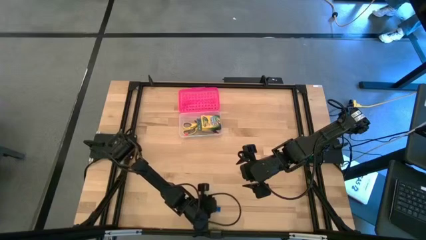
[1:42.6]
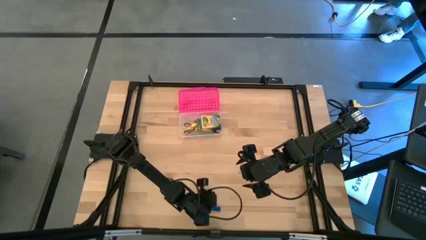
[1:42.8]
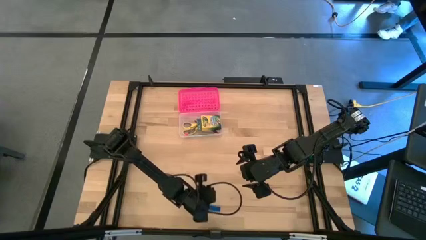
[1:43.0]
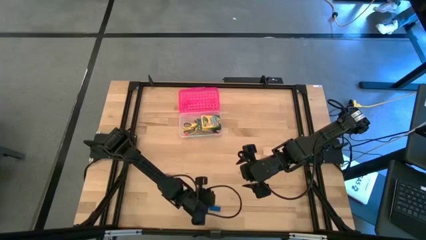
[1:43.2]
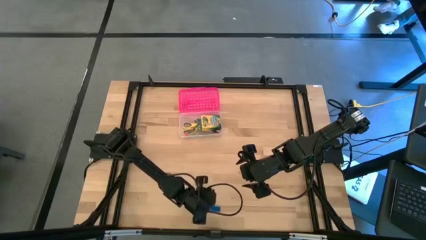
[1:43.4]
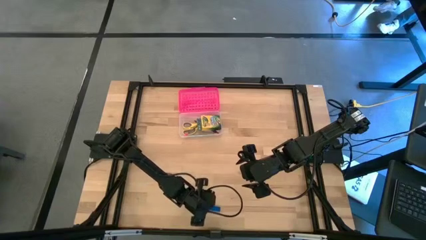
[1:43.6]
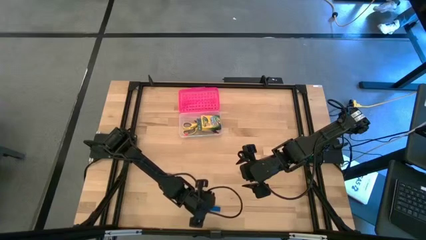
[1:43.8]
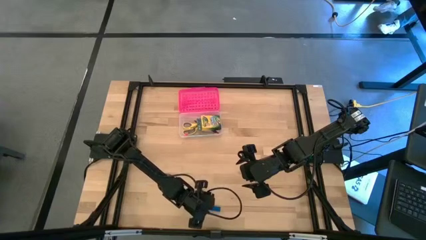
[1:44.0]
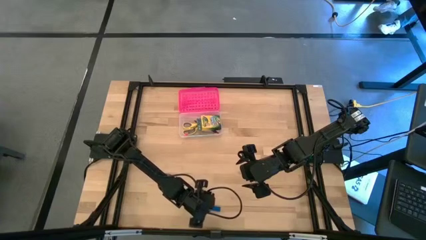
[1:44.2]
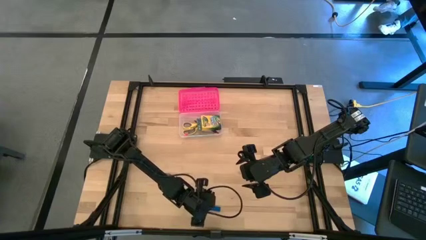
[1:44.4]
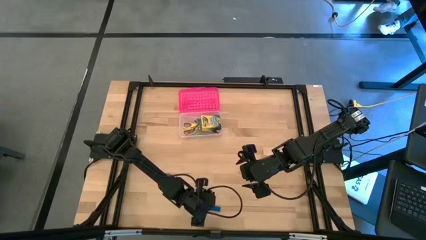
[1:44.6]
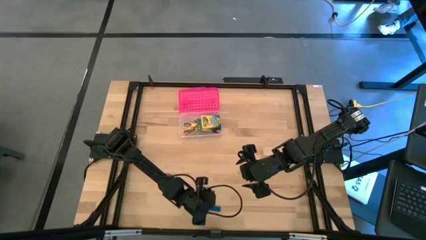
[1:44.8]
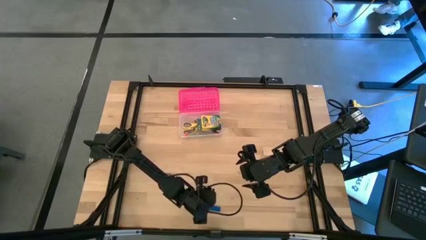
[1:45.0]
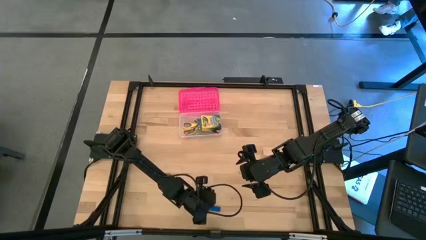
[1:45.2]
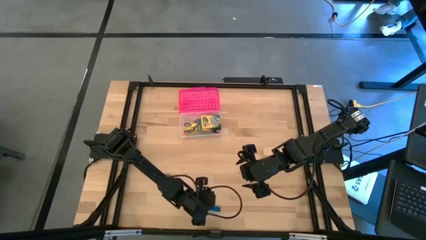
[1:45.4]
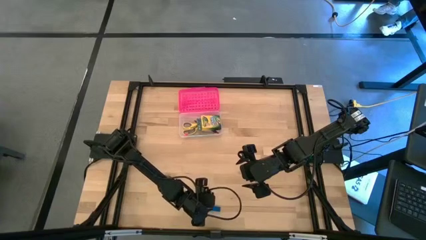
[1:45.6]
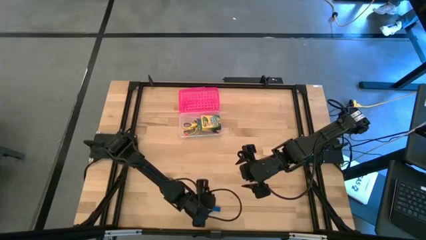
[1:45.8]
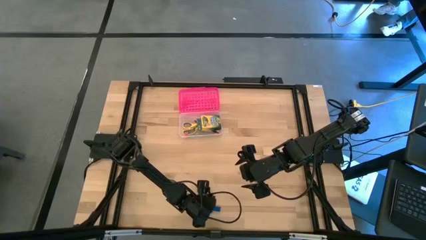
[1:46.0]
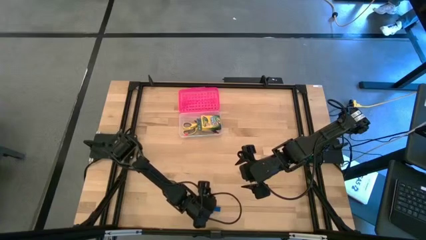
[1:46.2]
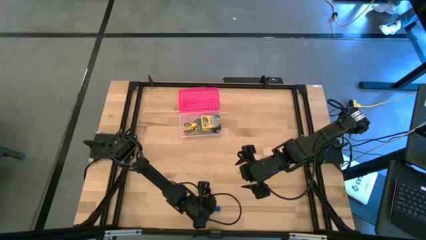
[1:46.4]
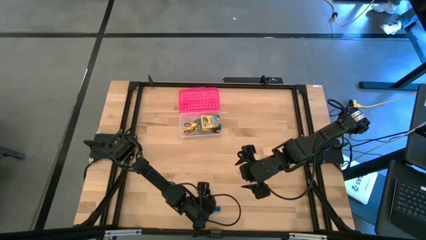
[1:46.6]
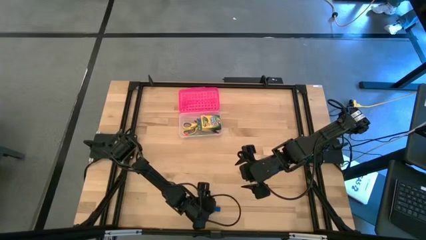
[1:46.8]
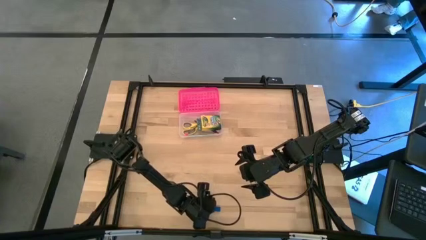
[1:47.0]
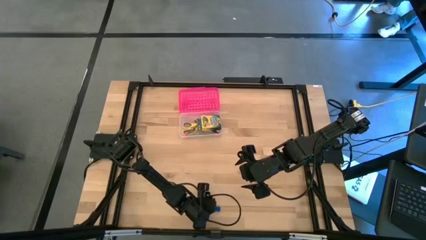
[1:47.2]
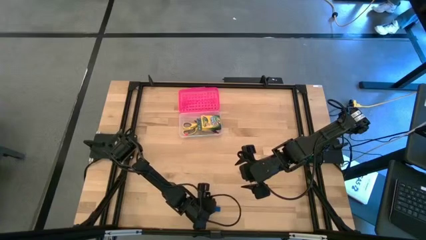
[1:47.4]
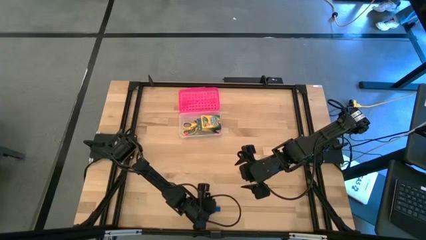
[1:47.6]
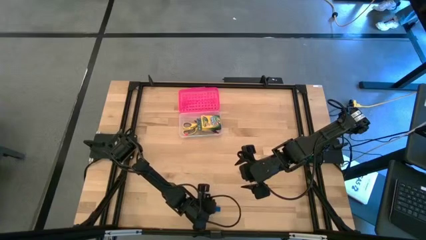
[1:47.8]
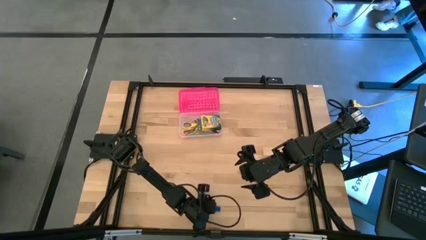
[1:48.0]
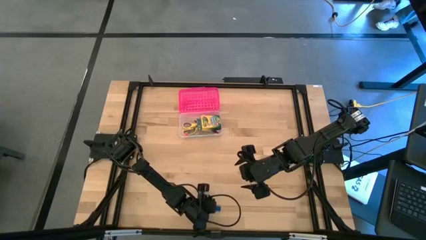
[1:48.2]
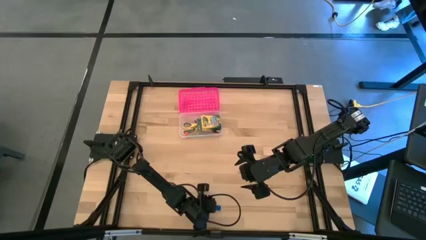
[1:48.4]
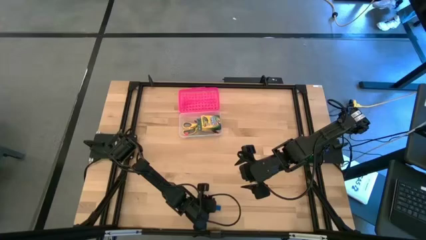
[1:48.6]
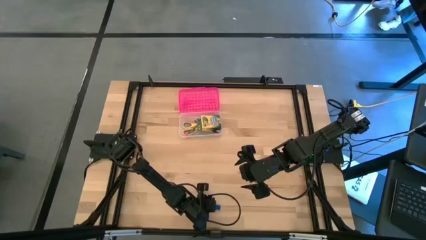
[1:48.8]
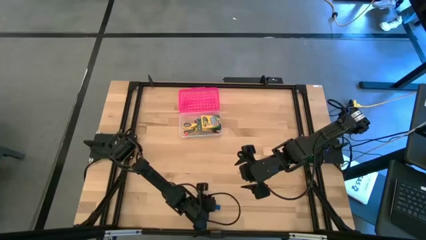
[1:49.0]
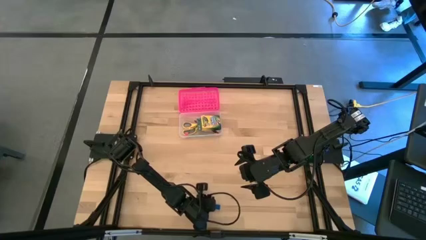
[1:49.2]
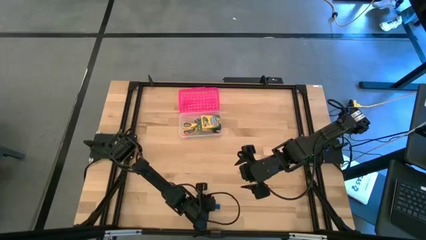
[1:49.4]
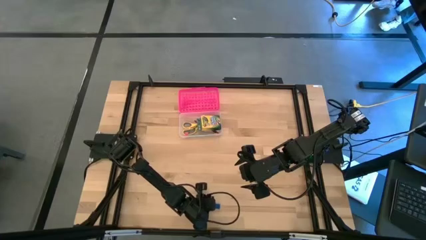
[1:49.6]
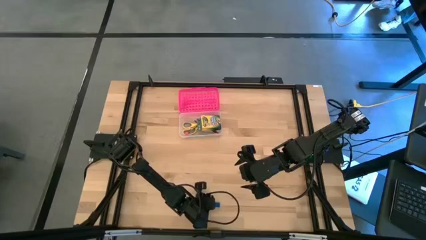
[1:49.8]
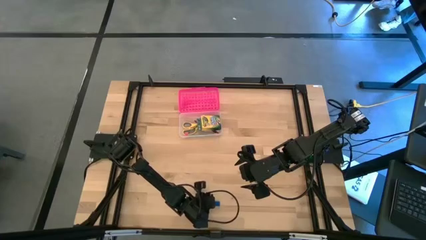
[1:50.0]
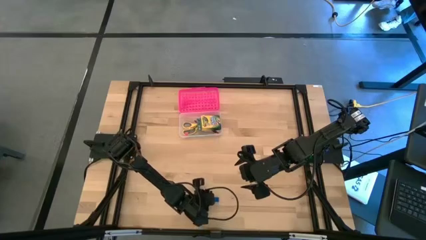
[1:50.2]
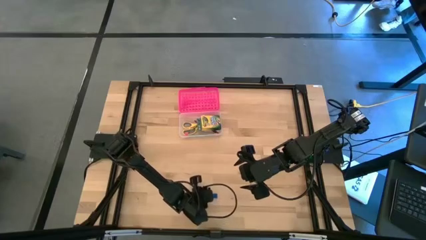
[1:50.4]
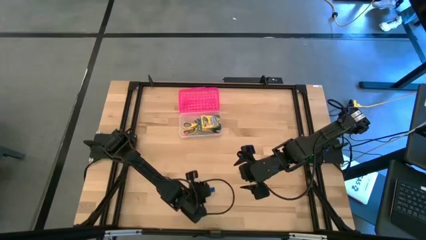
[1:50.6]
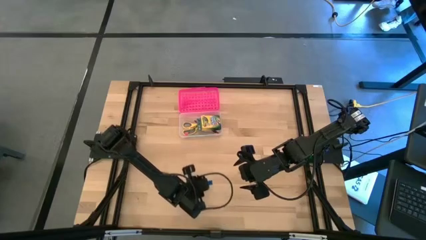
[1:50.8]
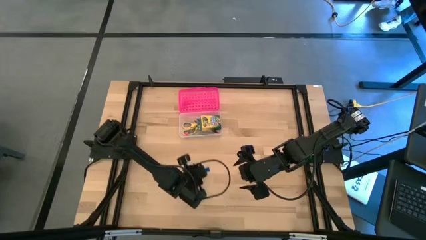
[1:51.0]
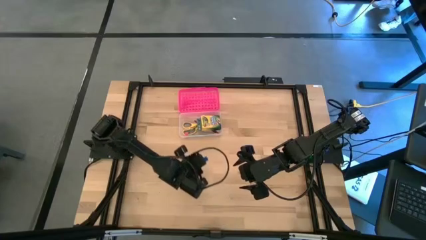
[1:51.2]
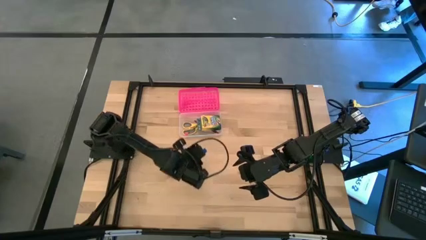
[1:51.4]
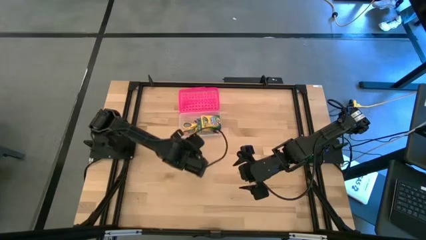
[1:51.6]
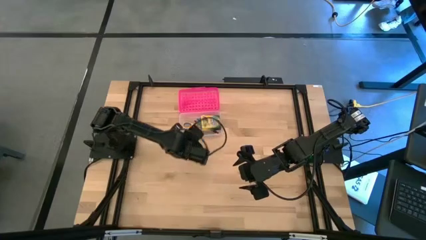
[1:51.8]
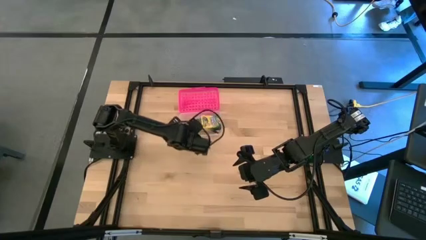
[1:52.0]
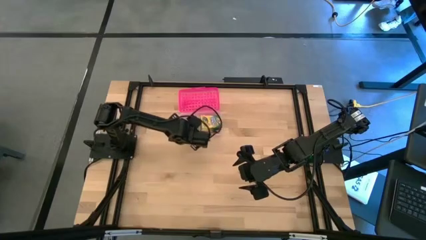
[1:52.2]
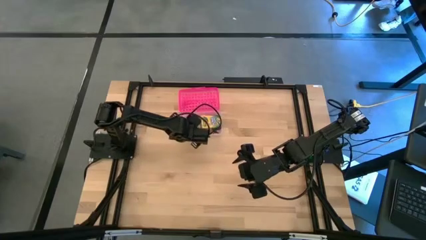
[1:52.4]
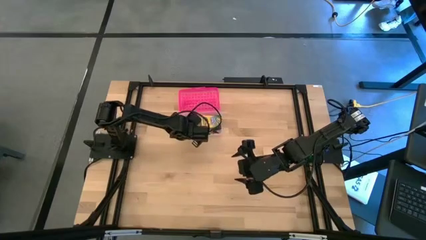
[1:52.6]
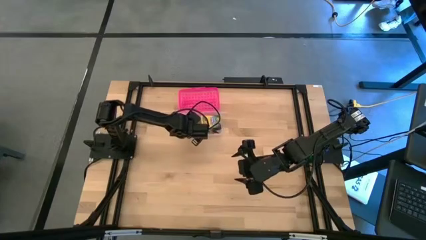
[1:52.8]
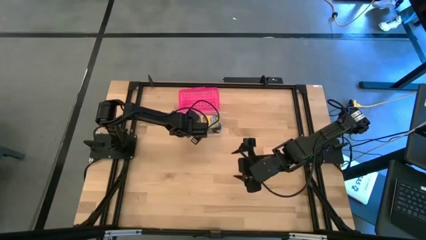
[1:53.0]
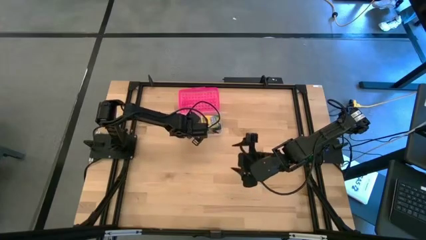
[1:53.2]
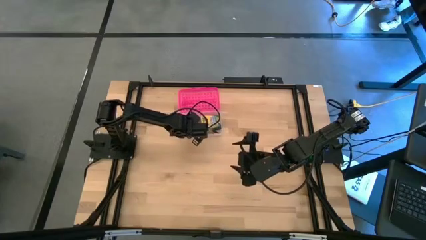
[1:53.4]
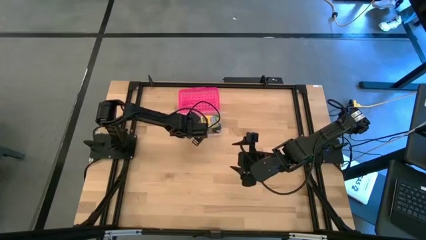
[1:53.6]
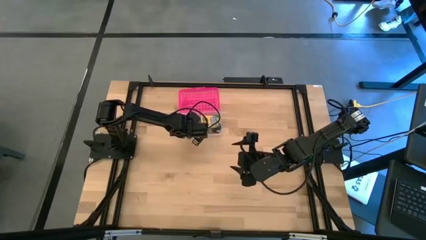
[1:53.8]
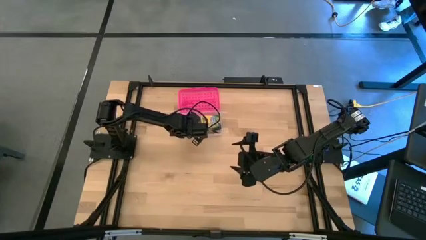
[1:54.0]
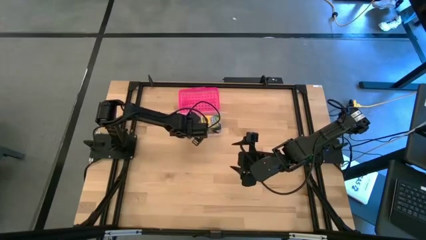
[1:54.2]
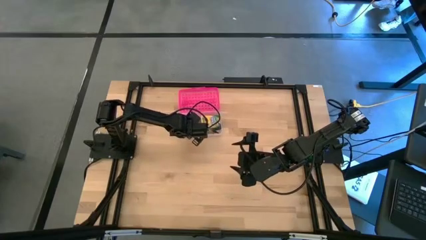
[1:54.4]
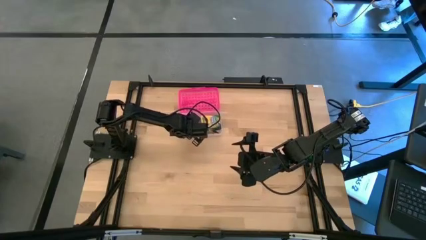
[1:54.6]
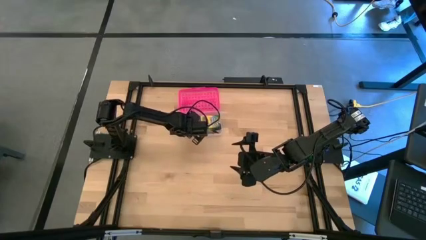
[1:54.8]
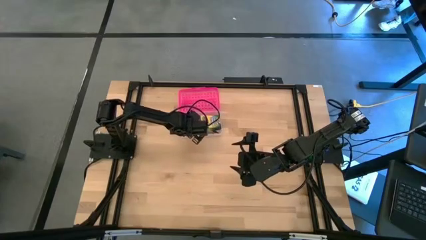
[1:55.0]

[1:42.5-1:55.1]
Task: Pack school essentials
Put the blue eraser into the pink supply box

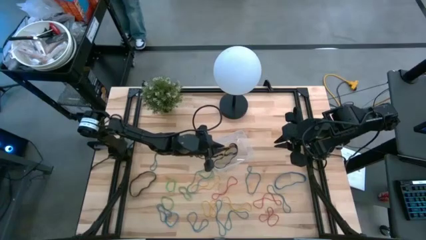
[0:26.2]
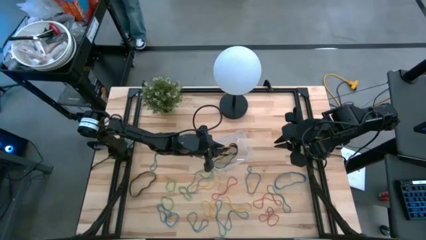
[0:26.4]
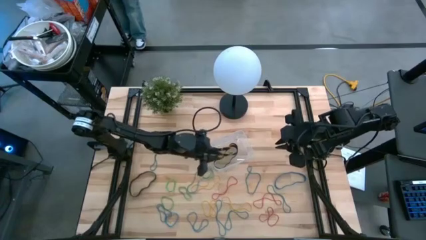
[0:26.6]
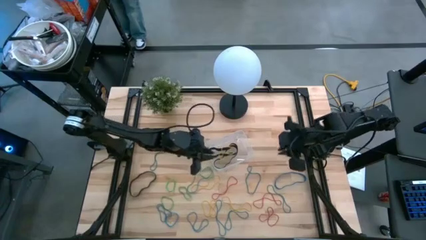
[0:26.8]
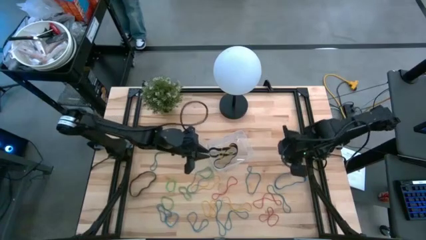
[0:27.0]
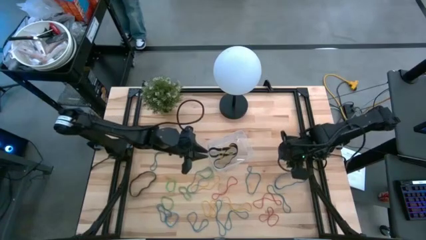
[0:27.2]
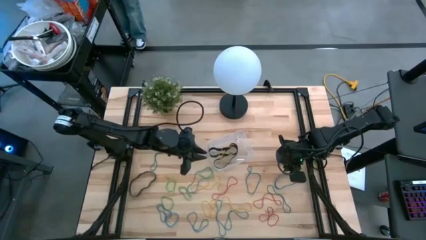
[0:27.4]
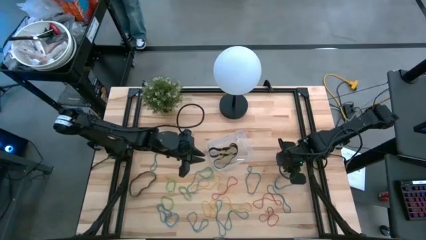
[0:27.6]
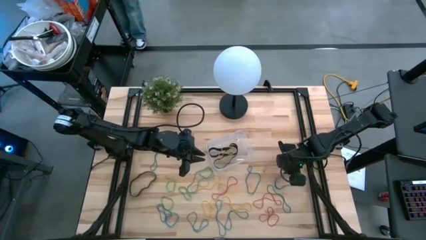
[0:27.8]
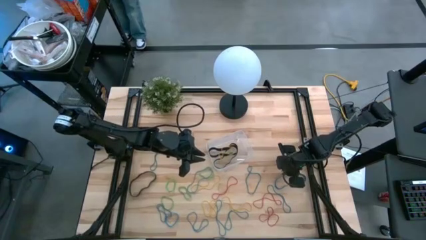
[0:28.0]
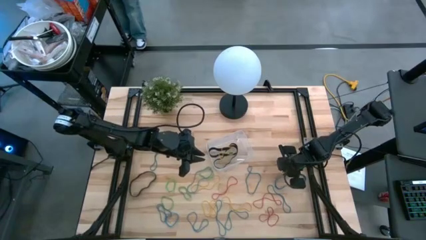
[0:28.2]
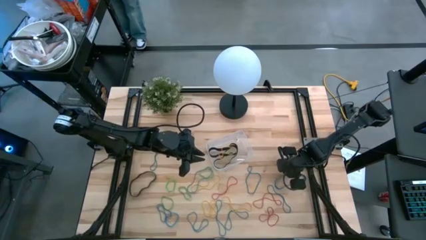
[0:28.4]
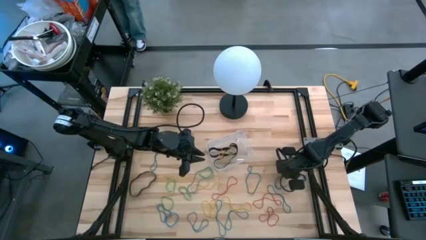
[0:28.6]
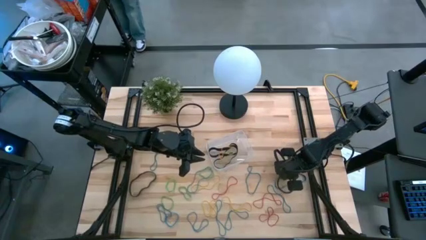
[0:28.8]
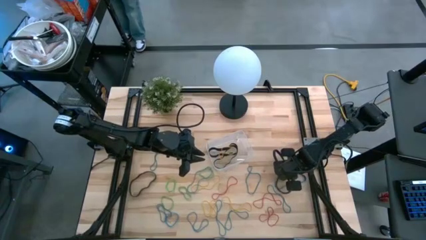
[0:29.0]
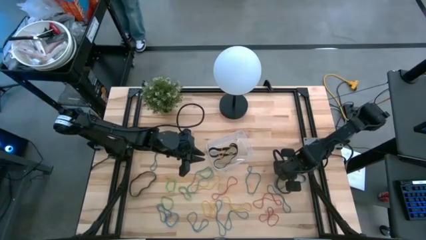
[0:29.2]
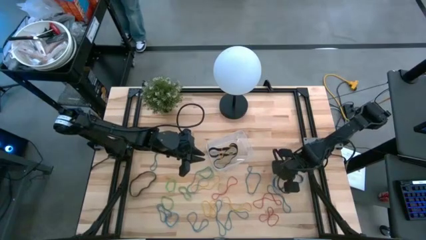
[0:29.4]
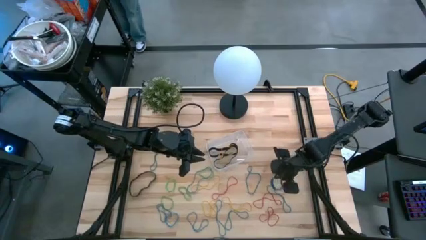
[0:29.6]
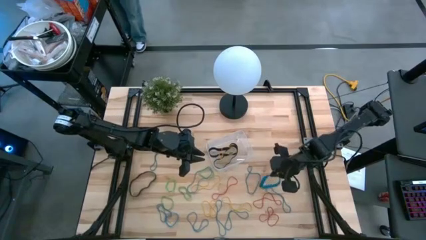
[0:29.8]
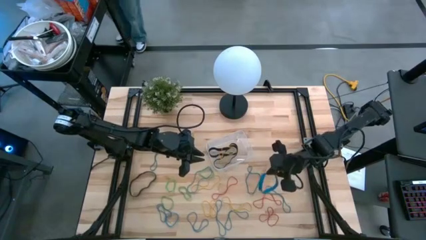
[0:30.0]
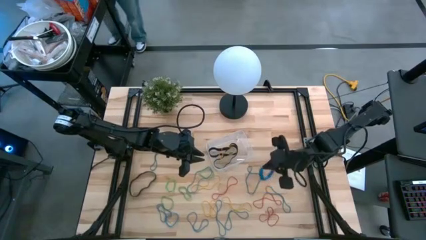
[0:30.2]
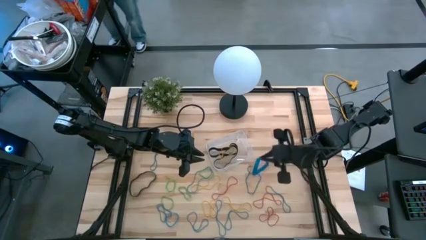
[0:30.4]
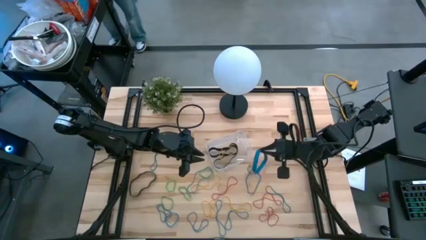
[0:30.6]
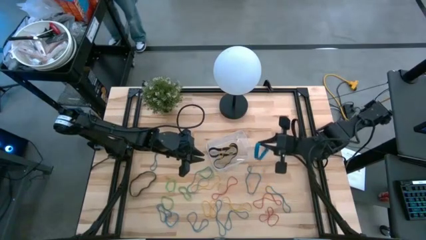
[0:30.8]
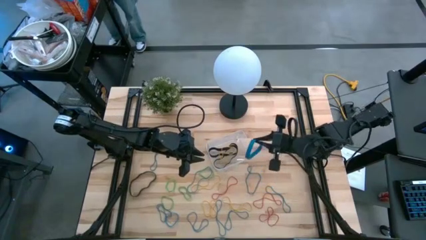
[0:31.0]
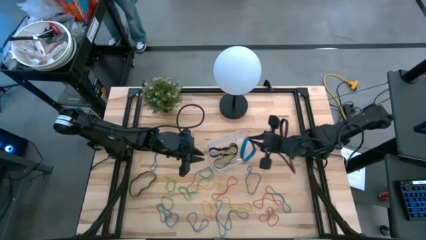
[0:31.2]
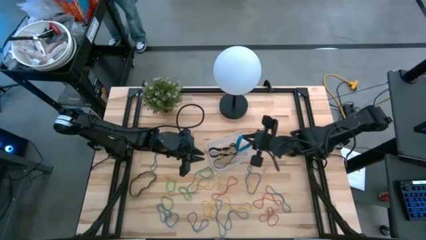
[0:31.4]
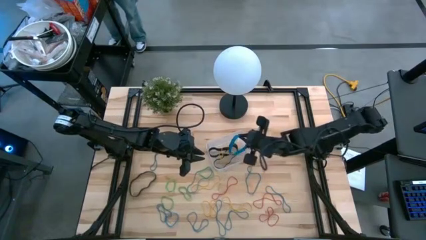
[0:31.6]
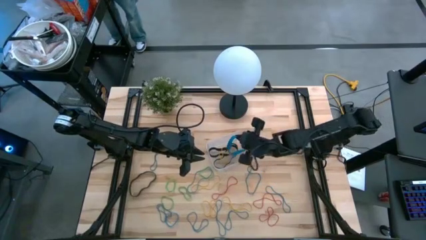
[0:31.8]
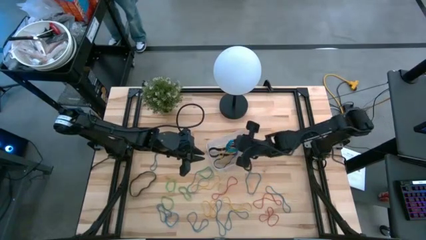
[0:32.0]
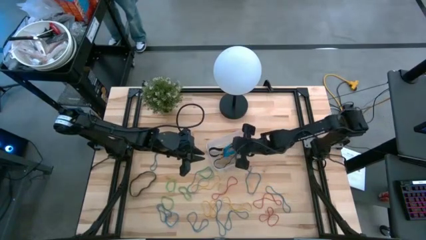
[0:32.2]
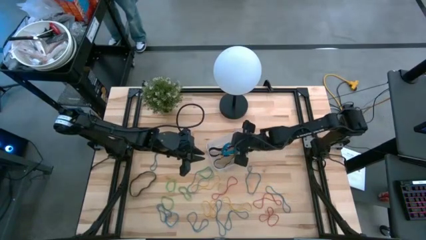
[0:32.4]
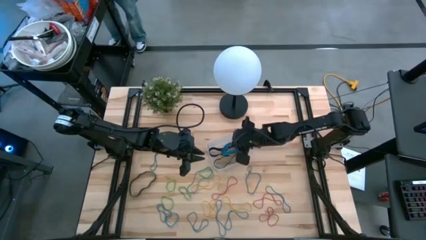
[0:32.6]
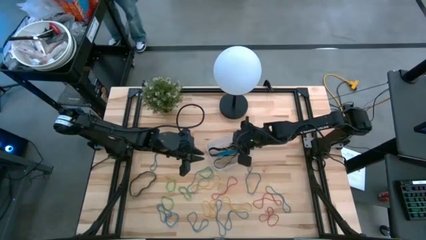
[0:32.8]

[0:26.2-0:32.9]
Task: Pick and place rubber bands into bin
Put the blue rubber band into the transparent bin
